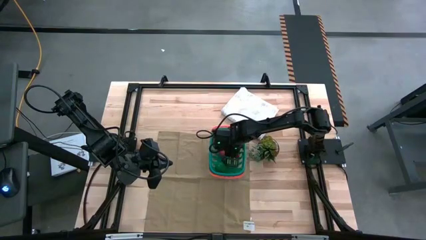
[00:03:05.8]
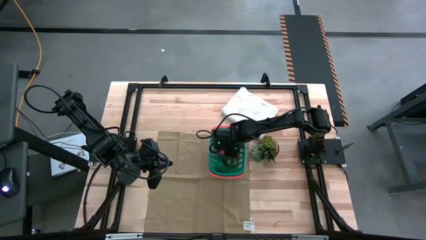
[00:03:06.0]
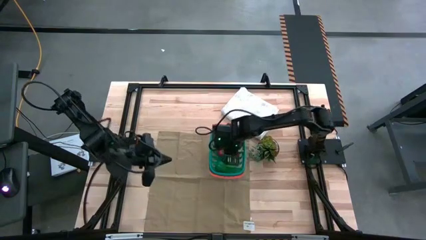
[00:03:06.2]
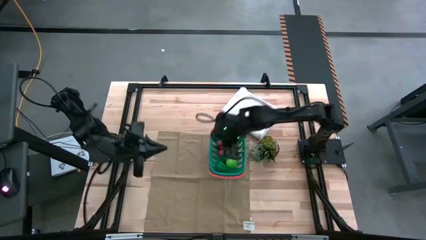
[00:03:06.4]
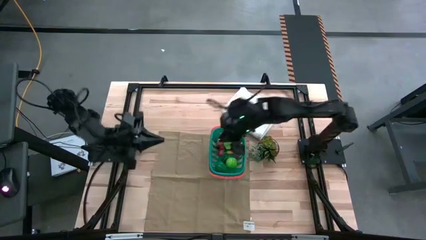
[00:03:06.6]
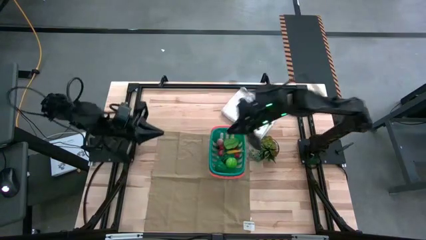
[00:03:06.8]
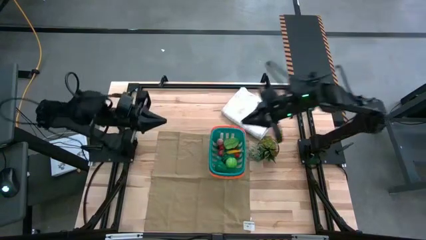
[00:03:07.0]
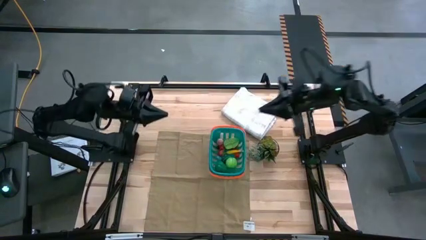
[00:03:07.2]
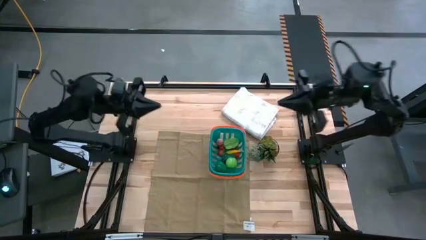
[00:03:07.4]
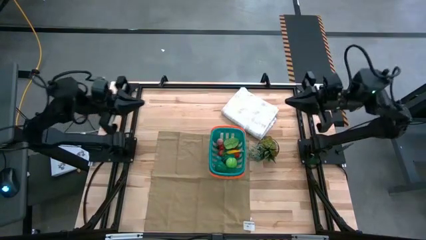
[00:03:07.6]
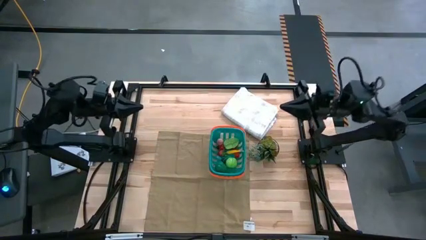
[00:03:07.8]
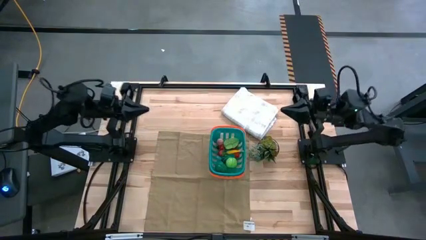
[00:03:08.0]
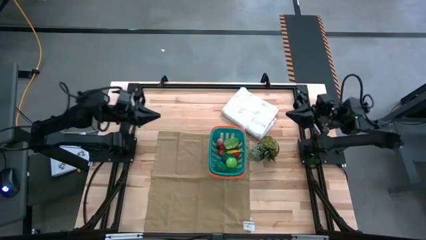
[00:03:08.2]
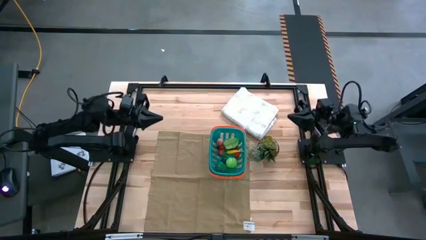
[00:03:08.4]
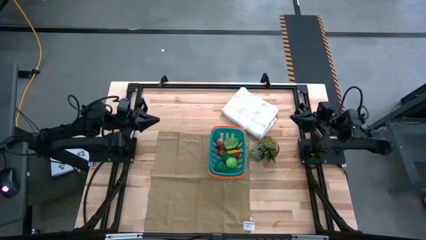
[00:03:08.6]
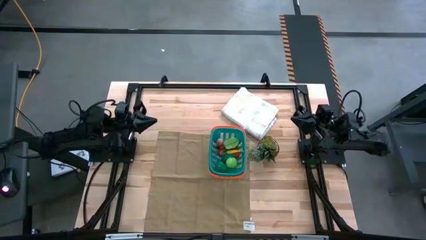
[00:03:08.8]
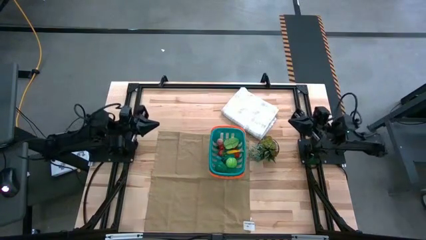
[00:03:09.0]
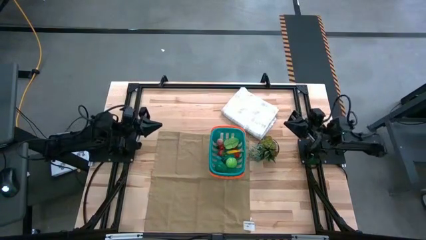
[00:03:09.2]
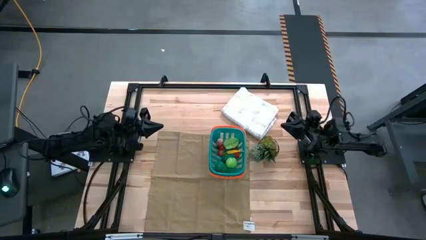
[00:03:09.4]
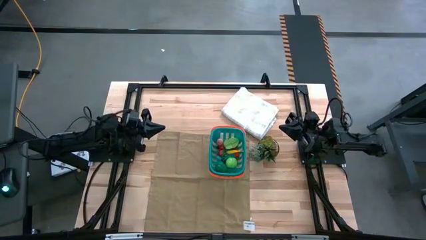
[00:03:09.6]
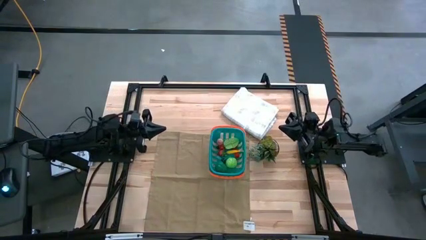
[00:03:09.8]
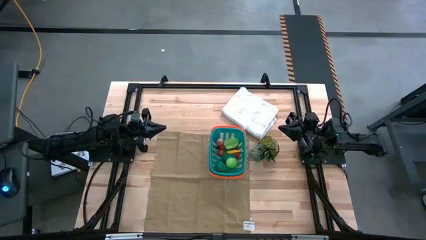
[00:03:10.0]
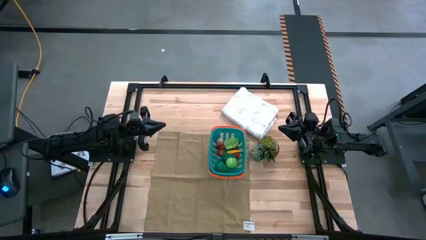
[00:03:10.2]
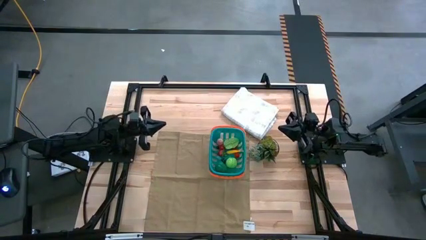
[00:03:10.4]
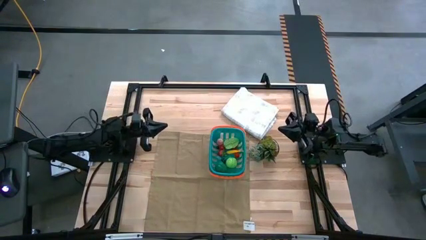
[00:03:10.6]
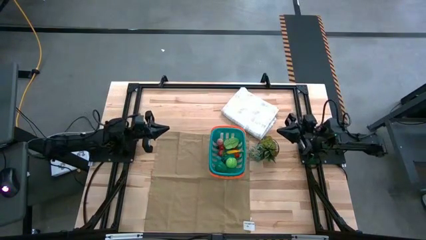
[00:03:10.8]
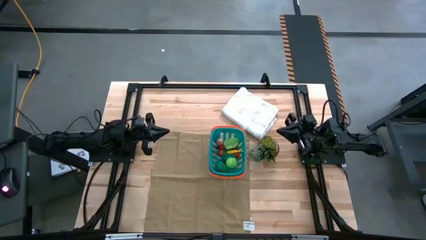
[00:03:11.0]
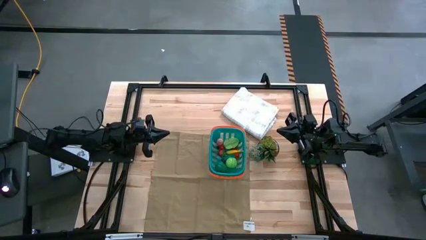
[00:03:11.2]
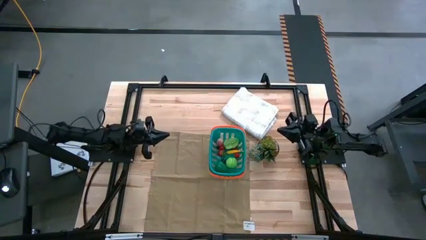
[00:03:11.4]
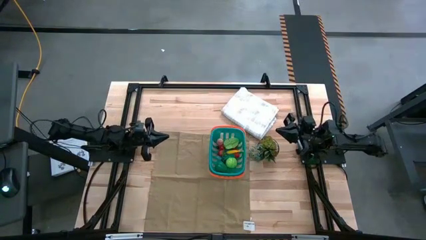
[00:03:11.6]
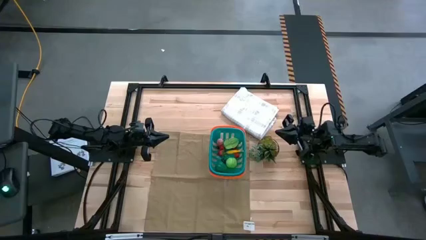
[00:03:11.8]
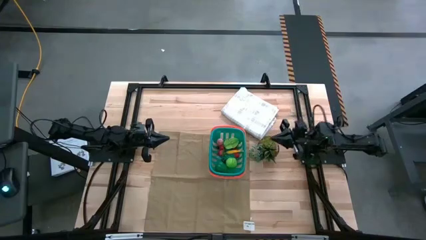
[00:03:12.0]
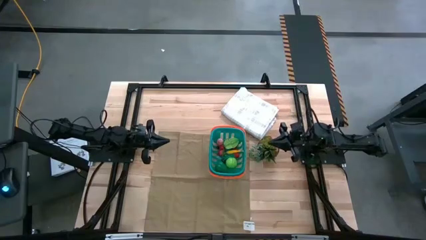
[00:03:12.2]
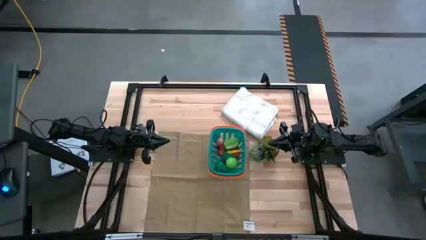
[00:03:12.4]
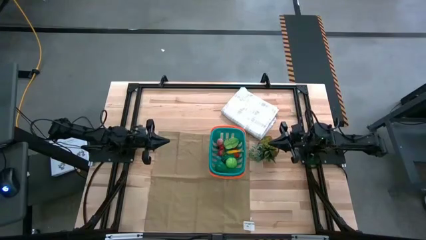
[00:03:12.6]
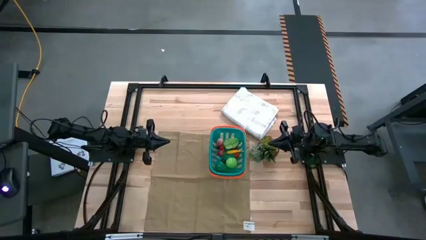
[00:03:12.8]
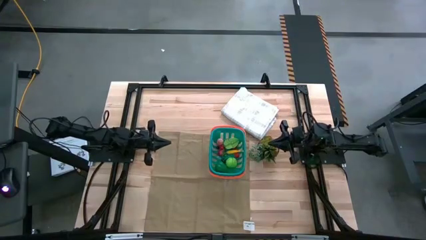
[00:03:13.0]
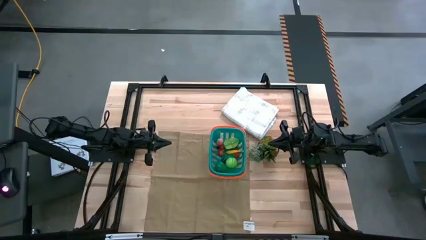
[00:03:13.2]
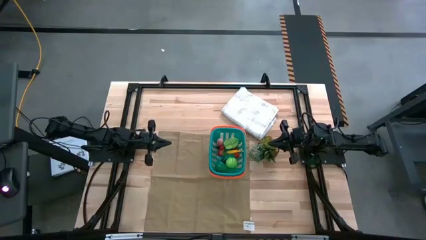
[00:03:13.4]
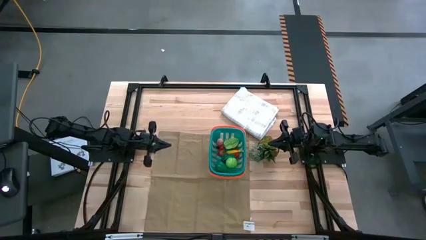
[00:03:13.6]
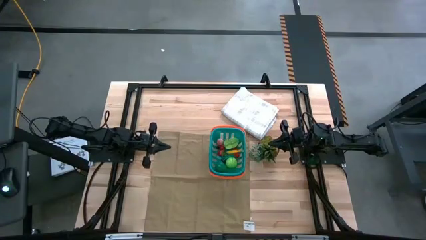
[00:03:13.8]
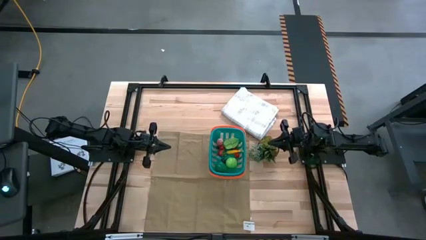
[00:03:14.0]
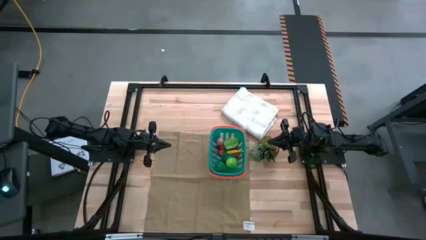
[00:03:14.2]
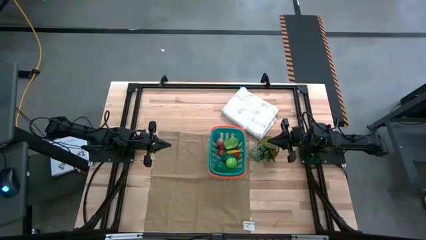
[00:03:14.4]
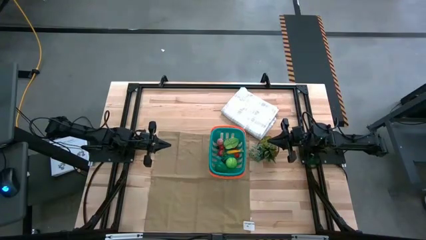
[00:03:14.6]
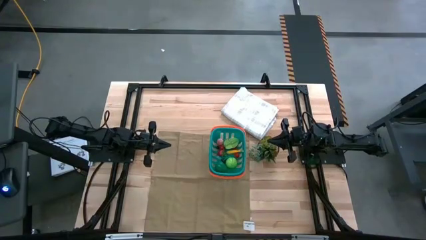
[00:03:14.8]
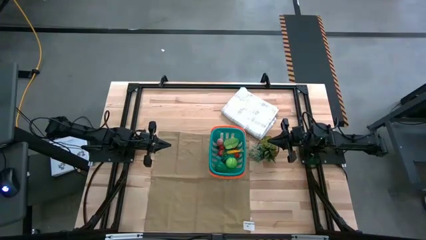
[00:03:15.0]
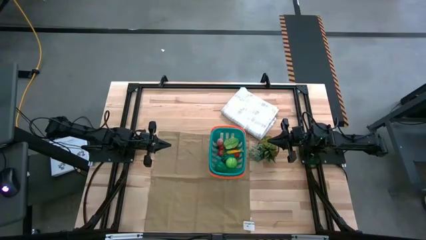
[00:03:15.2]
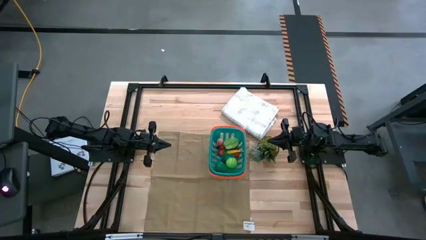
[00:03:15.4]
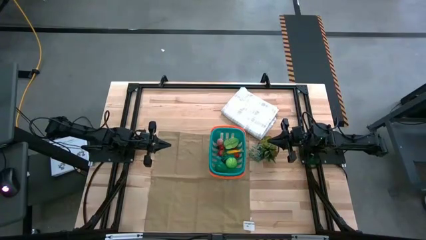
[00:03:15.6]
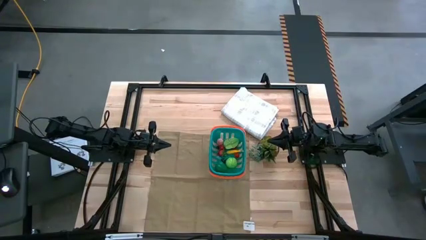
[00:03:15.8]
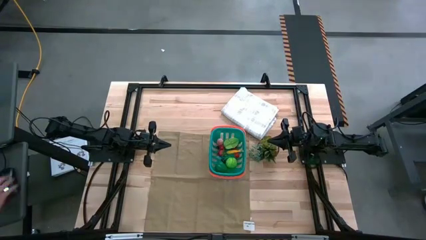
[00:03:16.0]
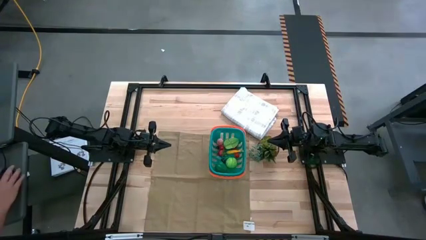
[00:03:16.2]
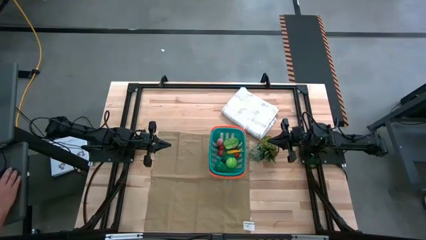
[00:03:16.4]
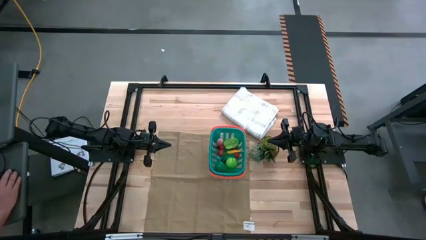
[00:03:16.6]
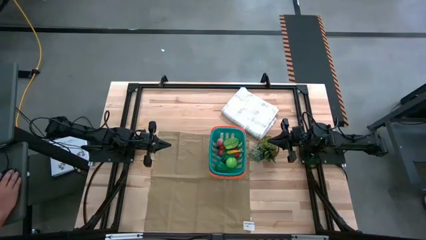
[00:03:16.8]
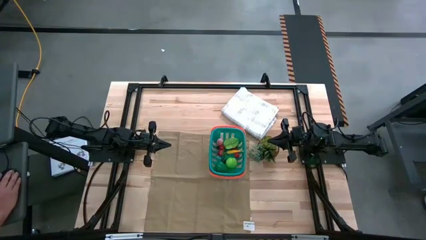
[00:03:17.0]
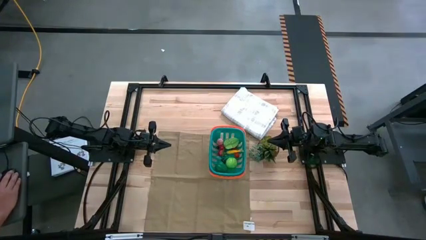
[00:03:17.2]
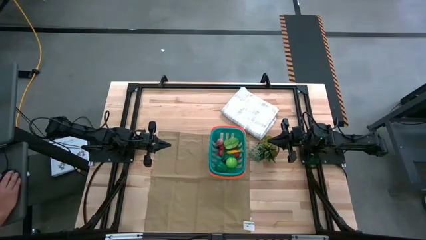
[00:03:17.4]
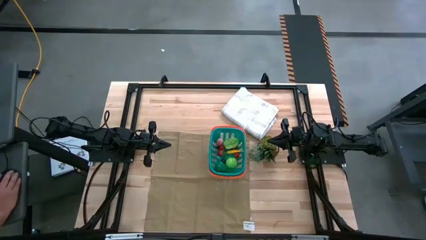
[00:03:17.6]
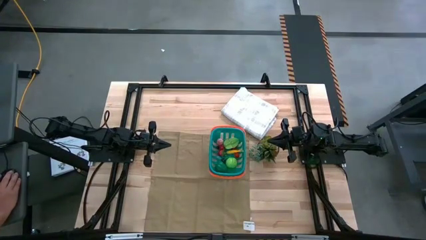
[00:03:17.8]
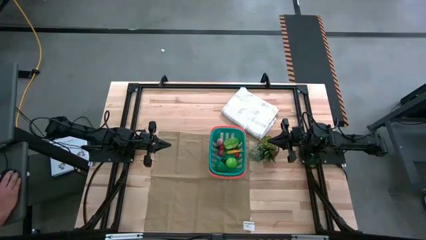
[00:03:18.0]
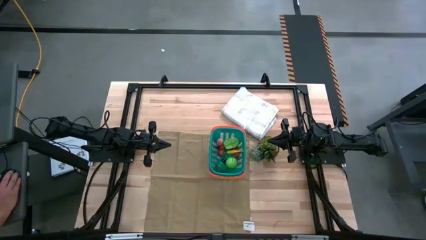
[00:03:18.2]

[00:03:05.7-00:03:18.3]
Task: Pick and placing Produce into tupperware
Return to Home Position
